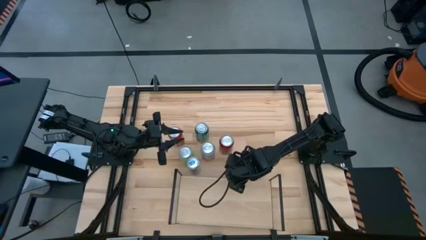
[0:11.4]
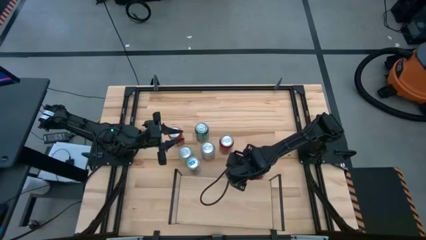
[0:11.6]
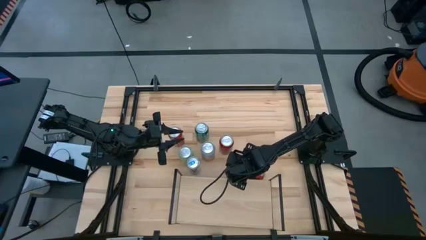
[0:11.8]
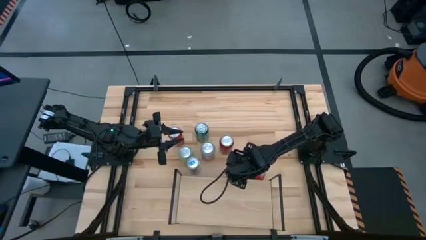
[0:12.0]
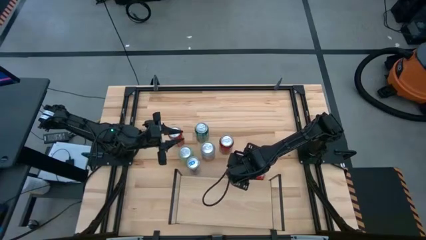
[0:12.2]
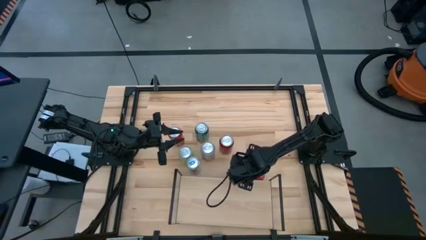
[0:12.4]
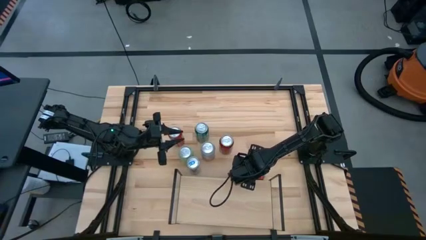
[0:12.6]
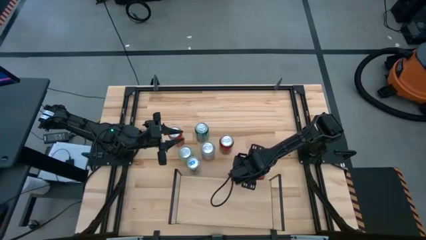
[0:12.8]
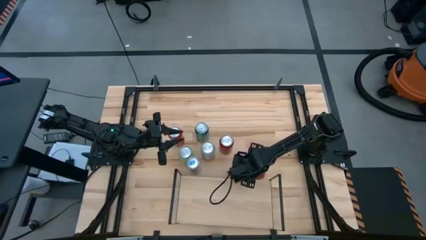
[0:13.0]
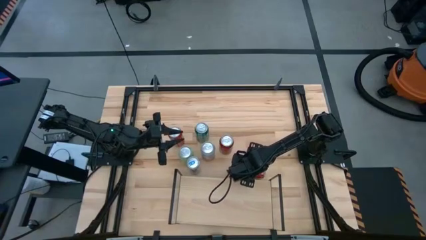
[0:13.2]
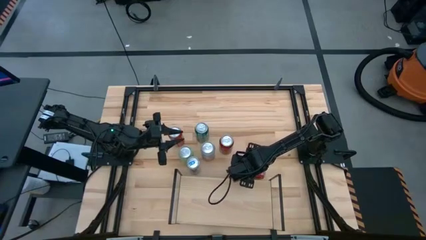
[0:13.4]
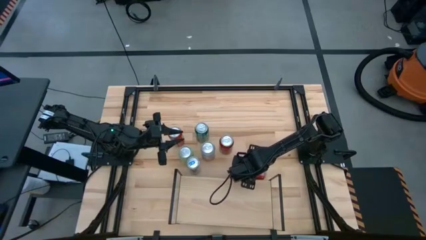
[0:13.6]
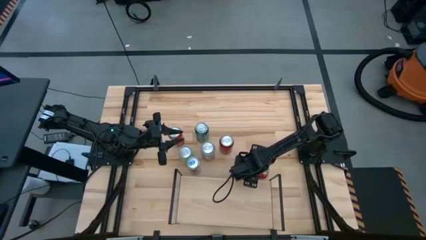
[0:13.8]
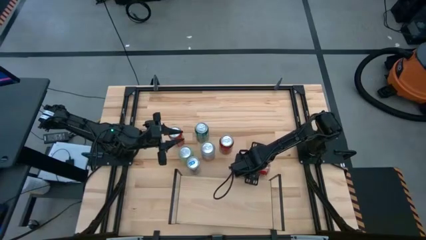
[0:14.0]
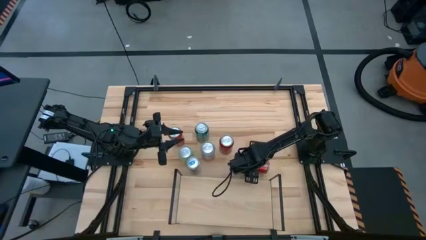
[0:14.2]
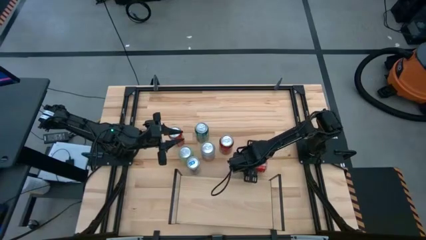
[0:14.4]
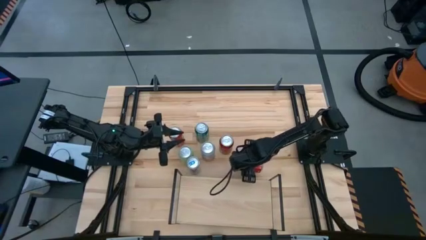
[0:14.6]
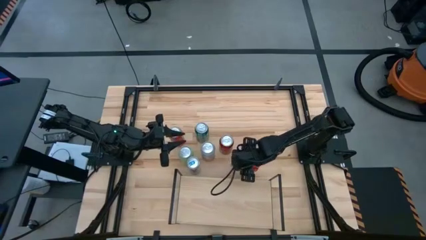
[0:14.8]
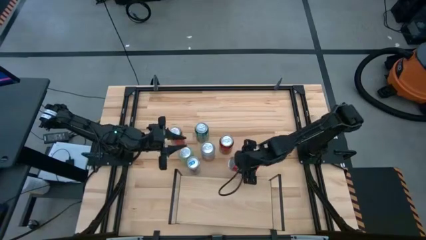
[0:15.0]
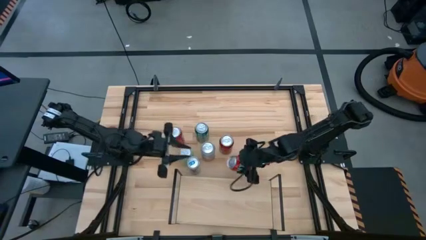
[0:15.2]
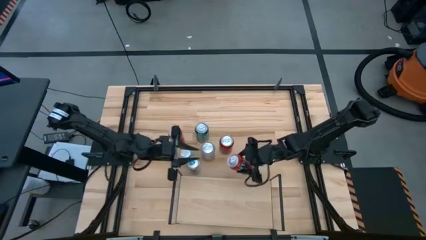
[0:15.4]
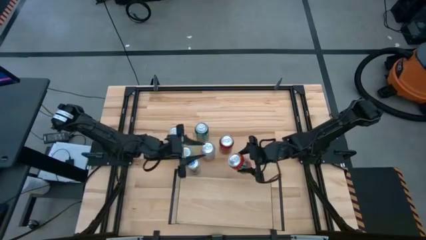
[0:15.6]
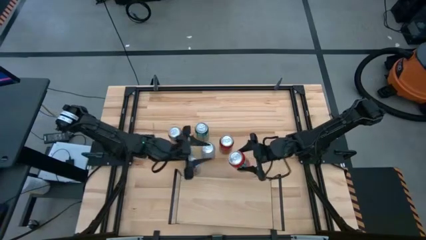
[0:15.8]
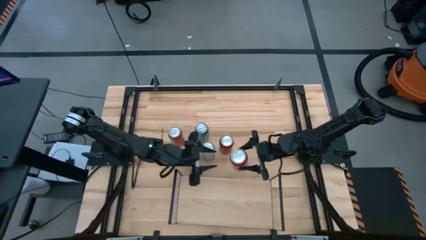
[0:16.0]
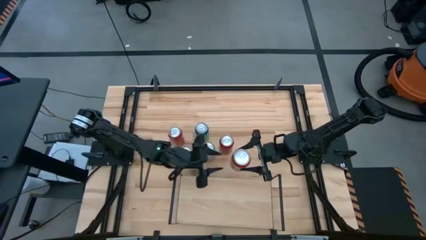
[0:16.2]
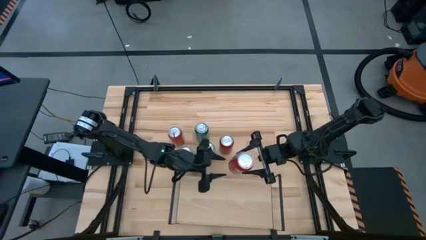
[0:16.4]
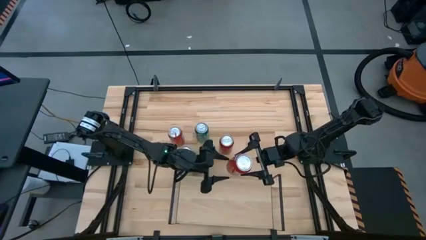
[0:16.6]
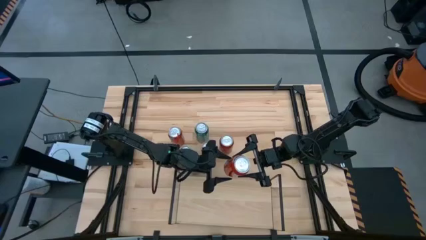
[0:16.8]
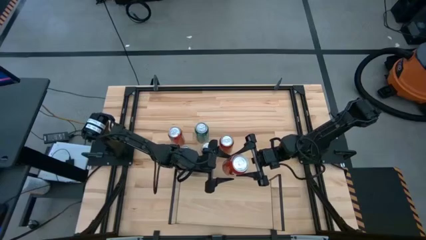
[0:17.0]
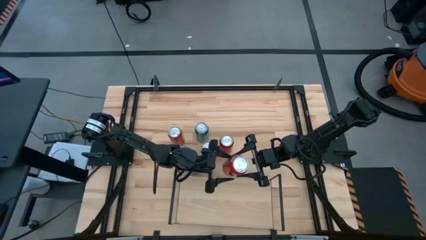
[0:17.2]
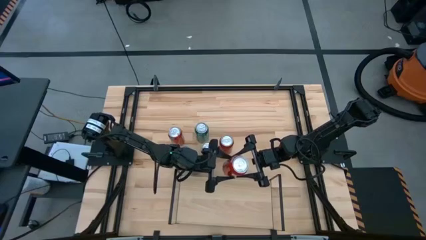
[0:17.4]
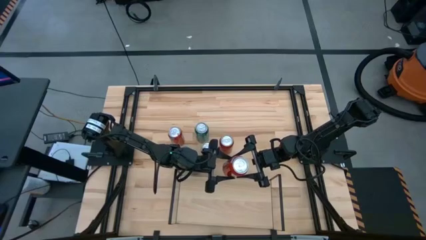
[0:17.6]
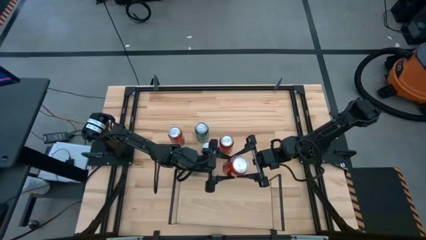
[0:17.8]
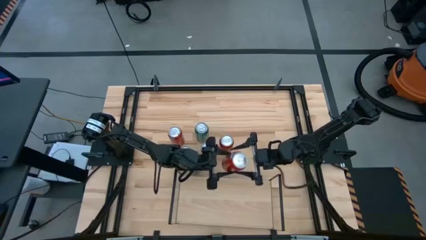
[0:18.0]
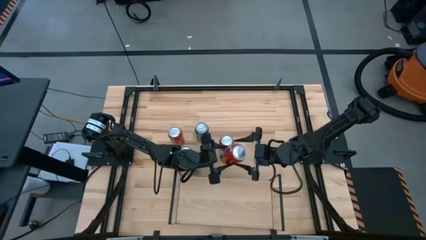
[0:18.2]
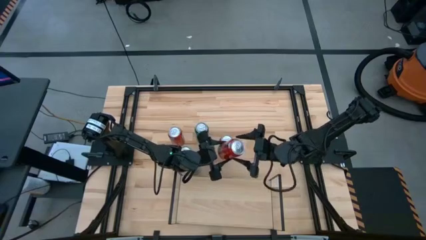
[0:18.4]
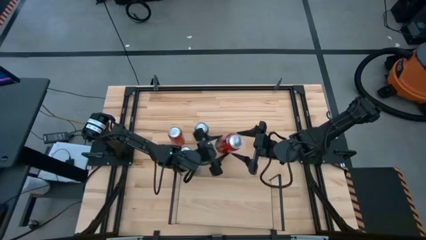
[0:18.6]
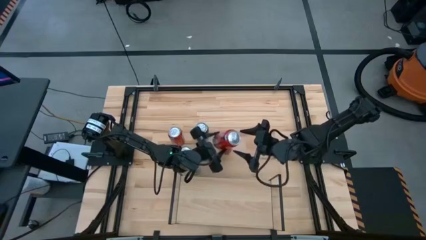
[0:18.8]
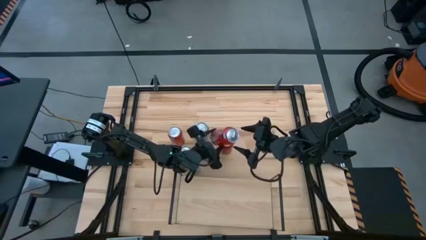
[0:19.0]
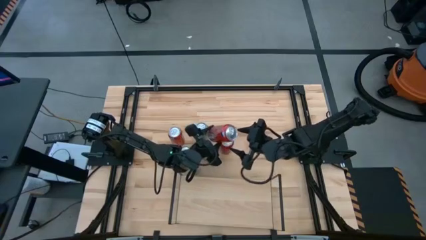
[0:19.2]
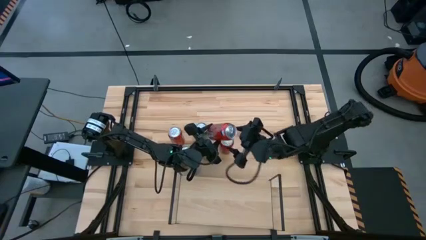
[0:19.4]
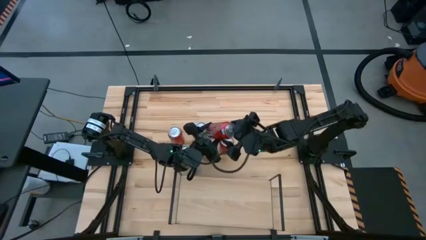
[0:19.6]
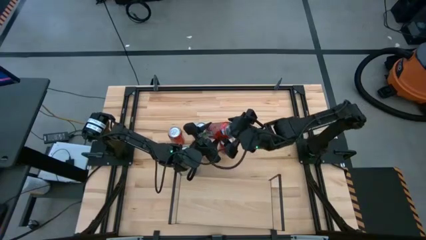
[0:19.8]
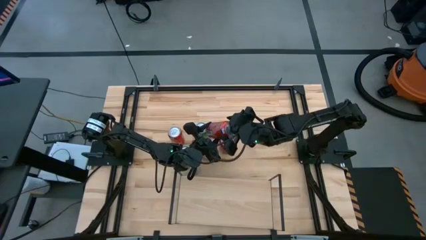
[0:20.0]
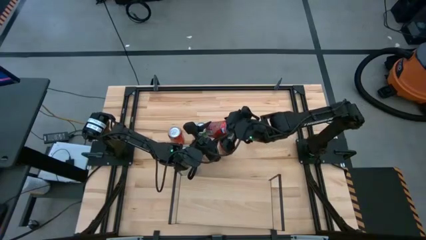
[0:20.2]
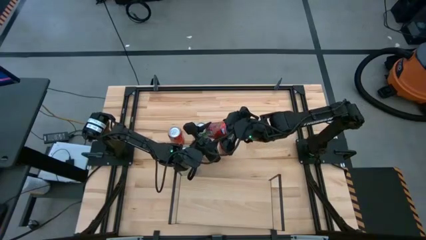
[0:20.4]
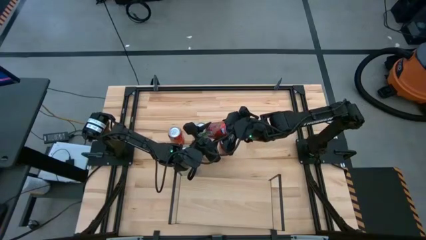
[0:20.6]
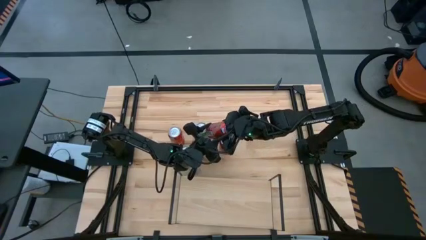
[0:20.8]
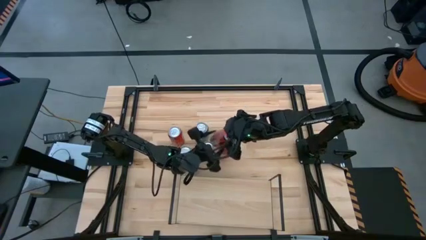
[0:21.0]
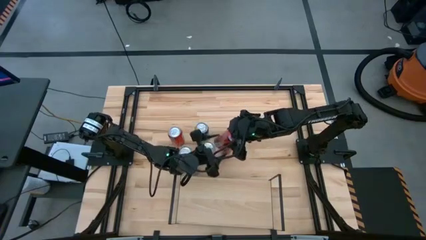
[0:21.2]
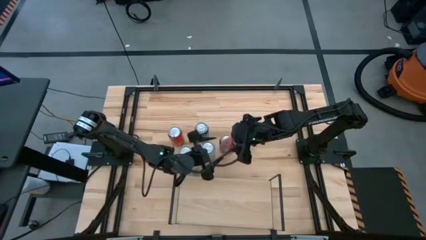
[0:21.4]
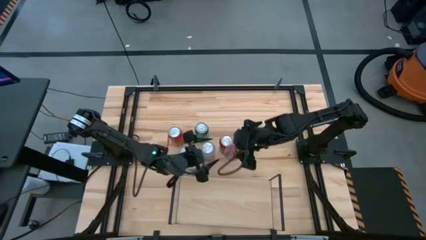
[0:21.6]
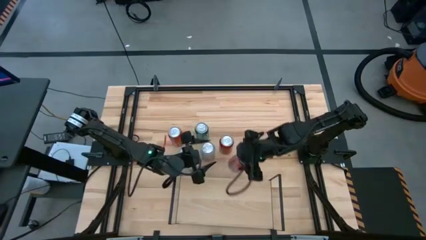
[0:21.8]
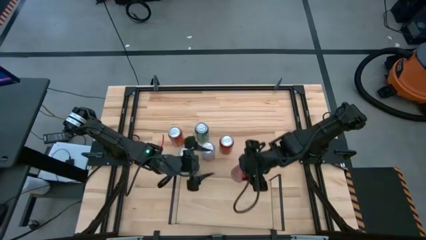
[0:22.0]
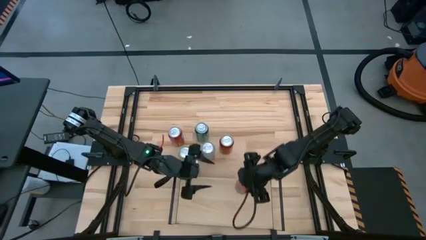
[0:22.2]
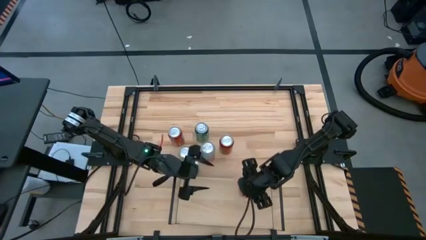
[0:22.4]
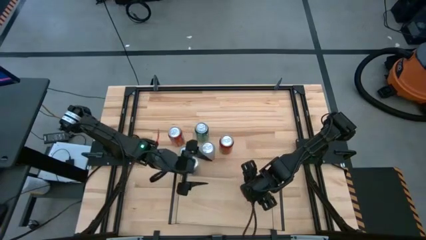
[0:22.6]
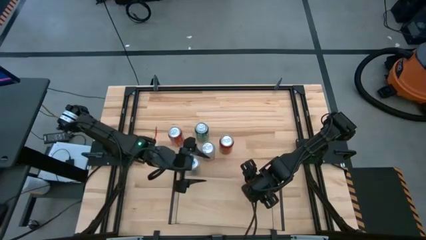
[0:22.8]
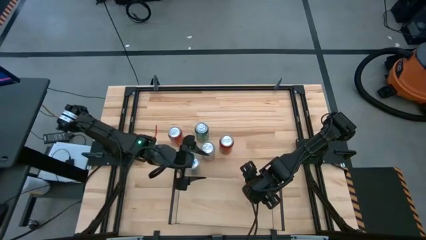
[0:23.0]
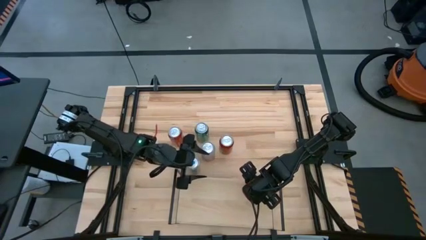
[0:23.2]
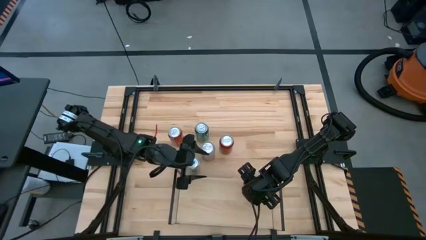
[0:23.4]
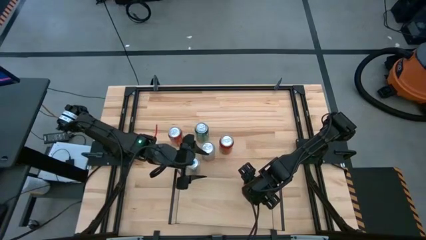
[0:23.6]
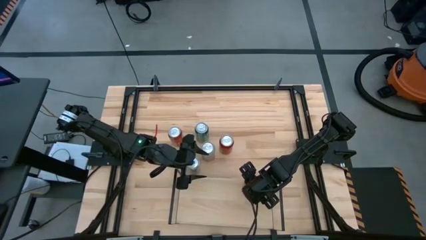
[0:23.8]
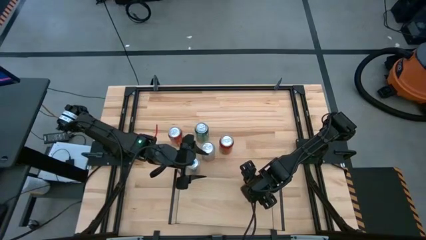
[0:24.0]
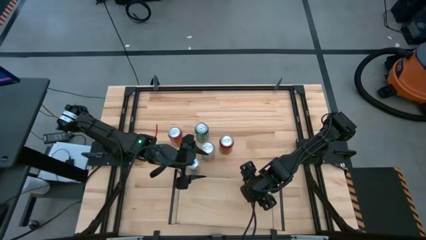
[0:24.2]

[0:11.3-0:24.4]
Task: Place canned beverage on shelf
Put the right orange soda can on the shelf

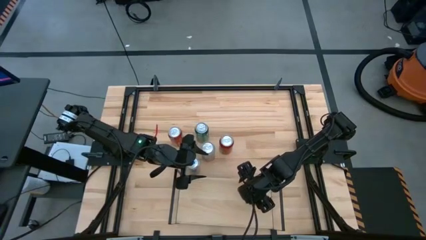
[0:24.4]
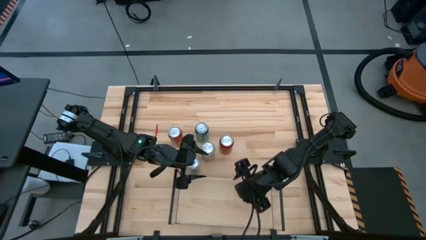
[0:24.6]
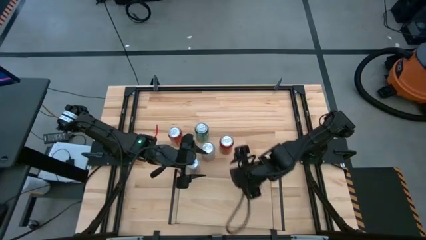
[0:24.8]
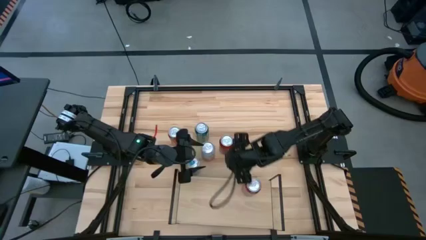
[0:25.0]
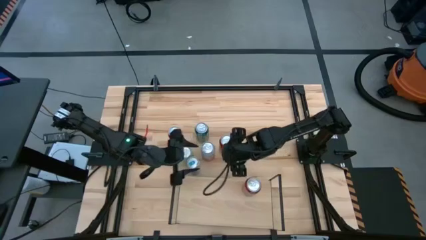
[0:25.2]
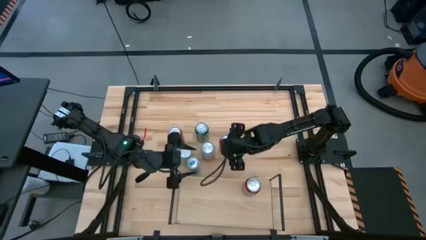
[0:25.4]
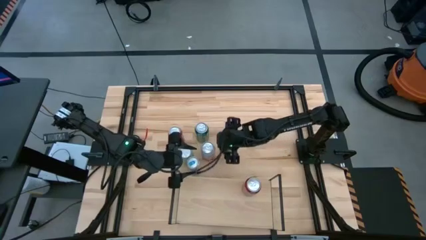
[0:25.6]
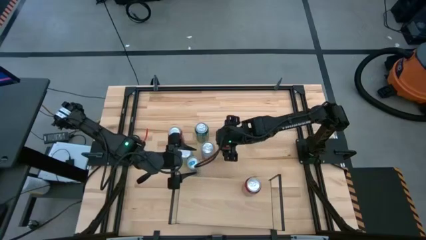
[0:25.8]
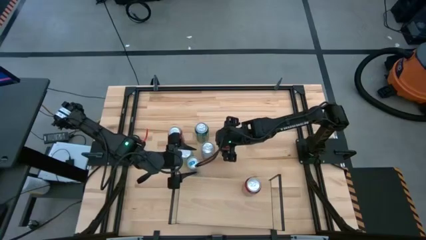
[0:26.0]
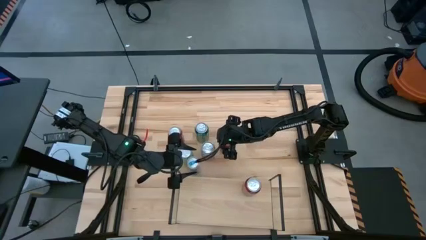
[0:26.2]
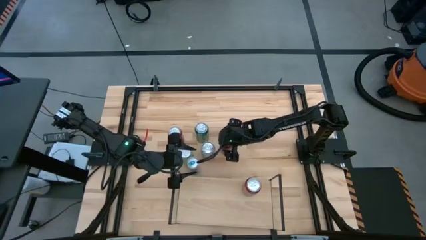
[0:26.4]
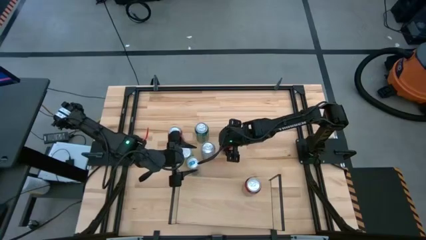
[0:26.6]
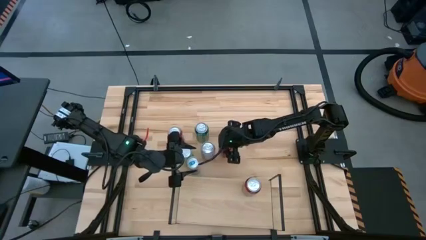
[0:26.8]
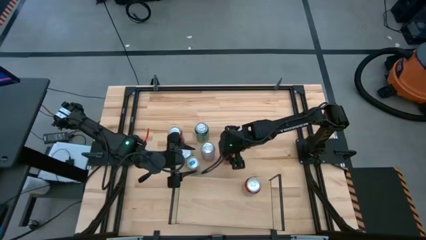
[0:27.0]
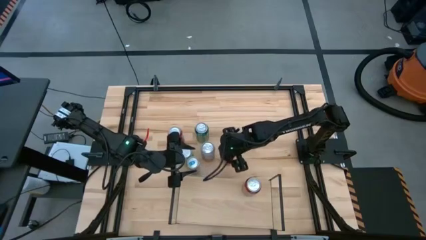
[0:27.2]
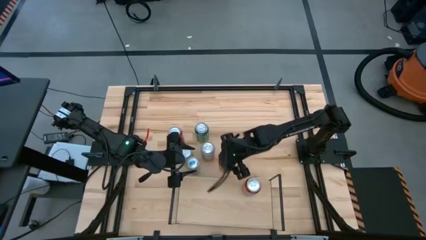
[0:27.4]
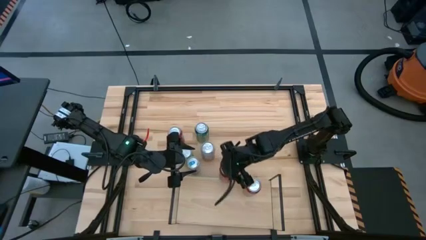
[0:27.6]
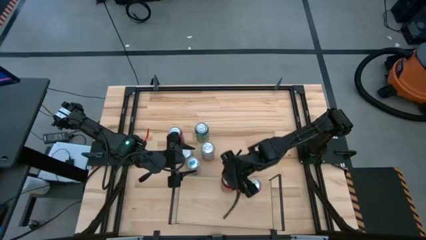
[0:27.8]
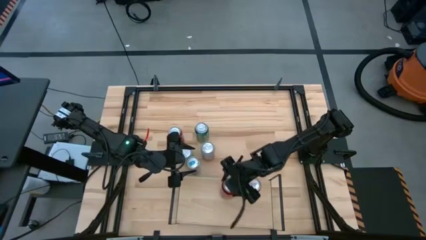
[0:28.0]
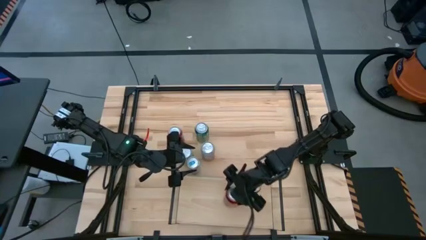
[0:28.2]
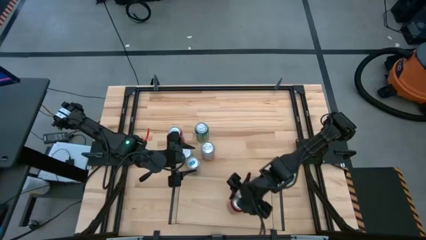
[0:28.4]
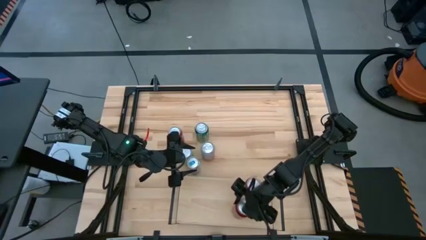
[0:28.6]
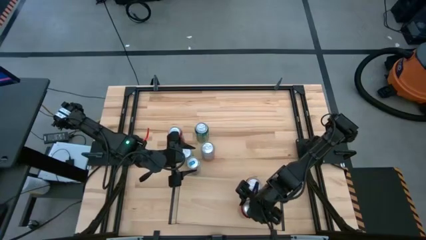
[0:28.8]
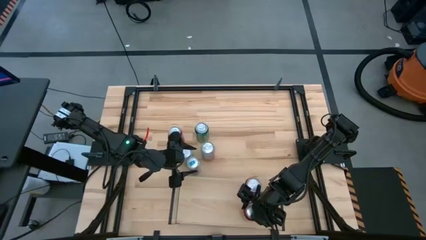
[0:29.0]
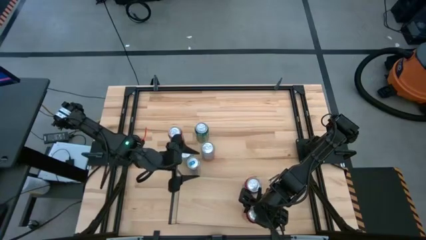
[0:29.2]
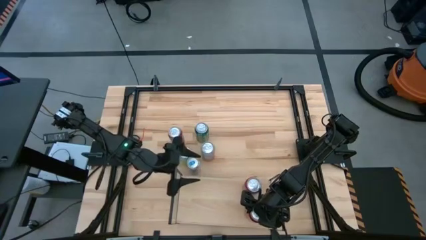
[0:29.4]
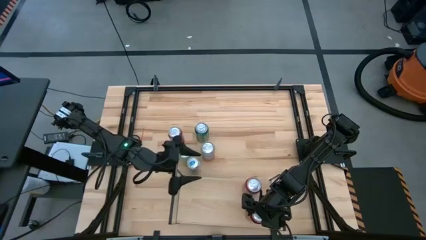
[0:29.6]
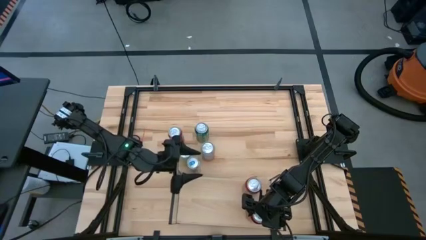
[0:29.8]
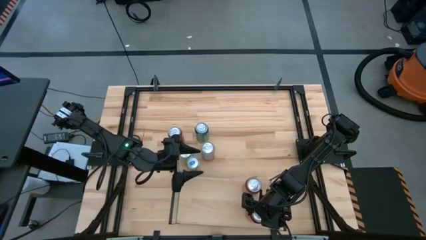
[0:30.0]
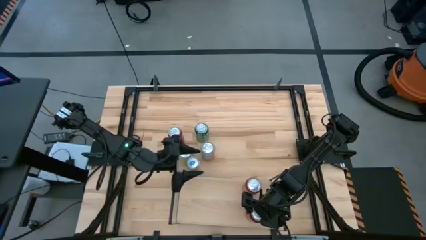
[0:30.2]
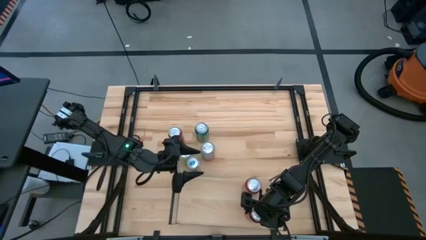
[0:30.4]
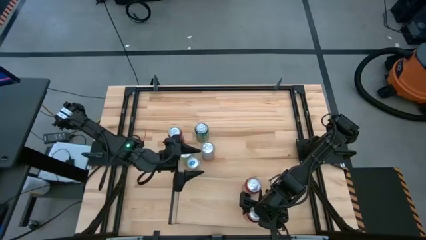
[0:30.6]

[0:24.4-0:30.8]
Put the red soda can on the shelf
